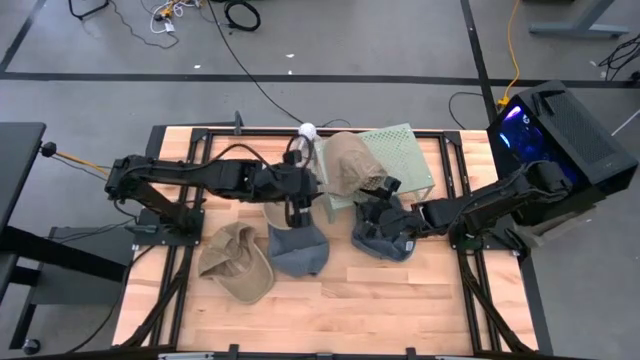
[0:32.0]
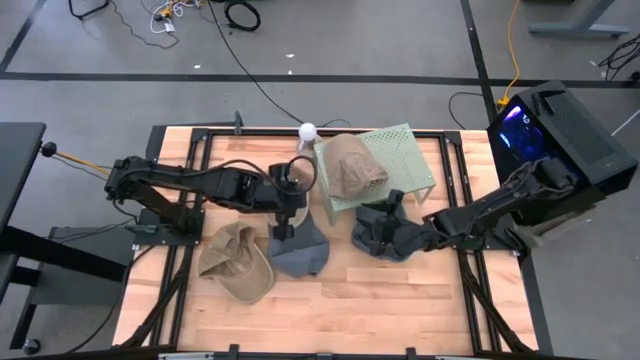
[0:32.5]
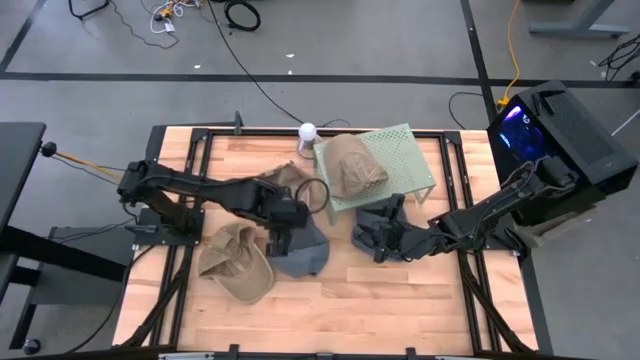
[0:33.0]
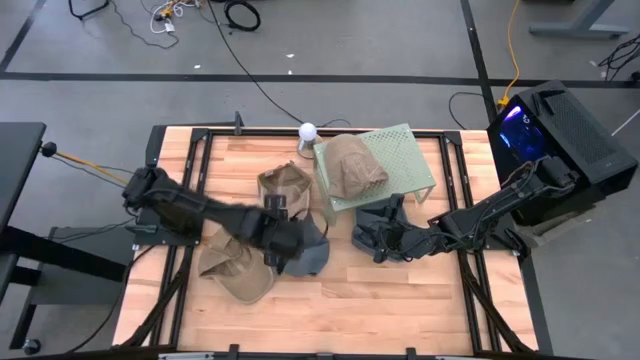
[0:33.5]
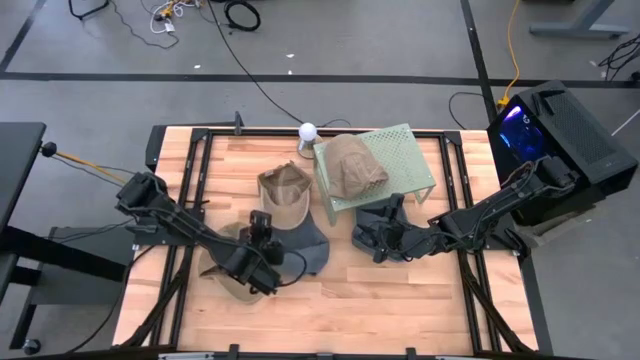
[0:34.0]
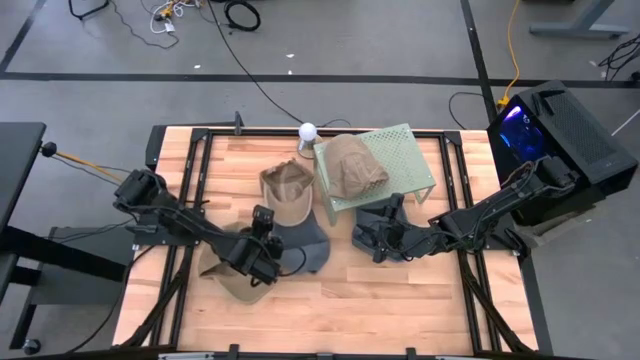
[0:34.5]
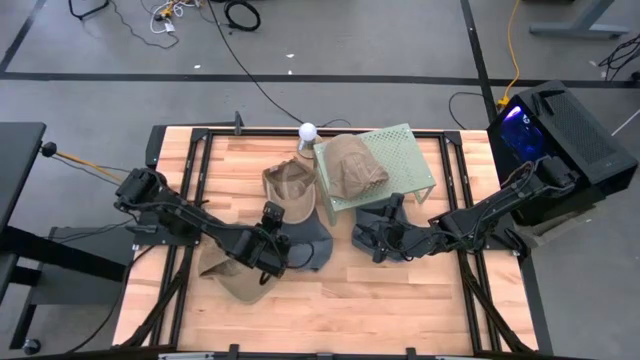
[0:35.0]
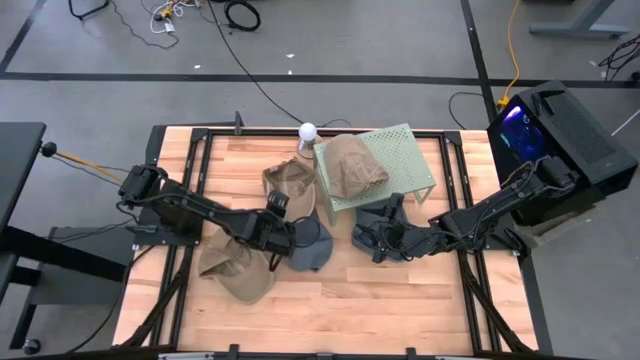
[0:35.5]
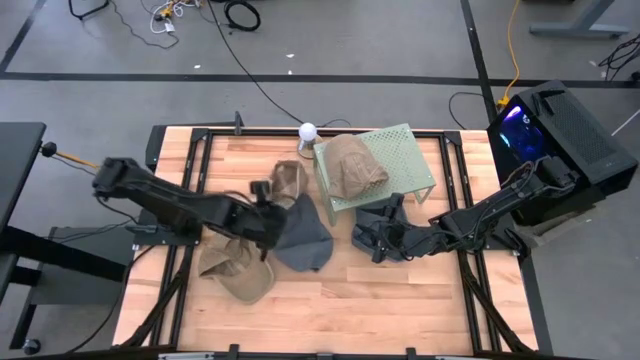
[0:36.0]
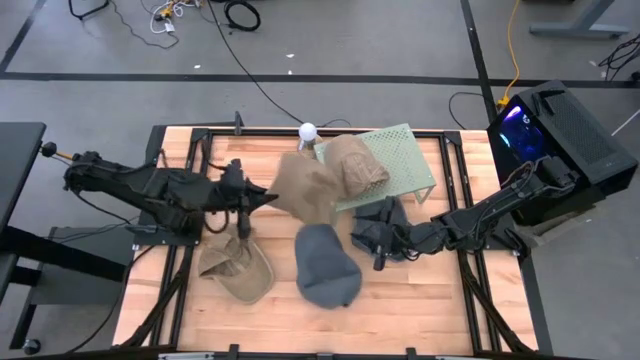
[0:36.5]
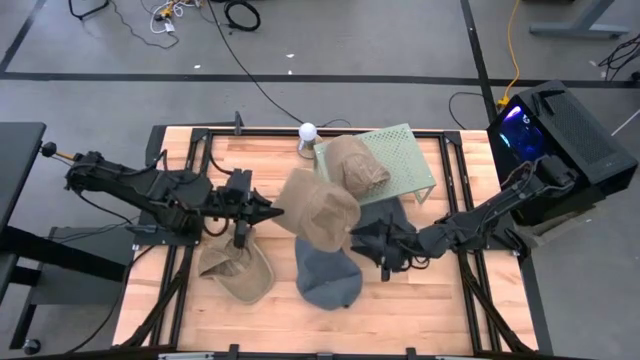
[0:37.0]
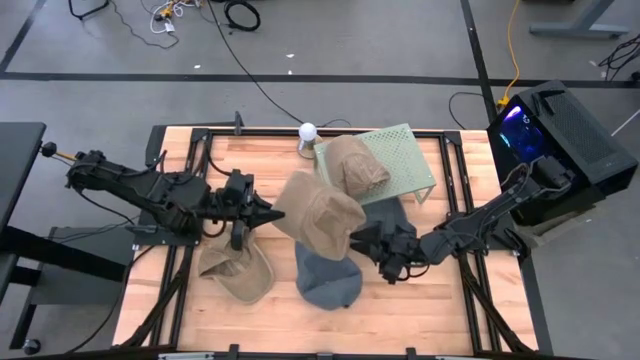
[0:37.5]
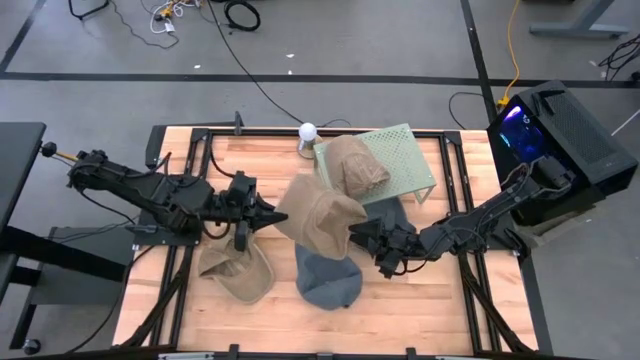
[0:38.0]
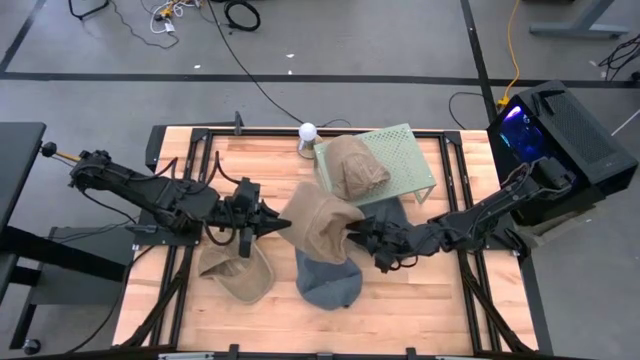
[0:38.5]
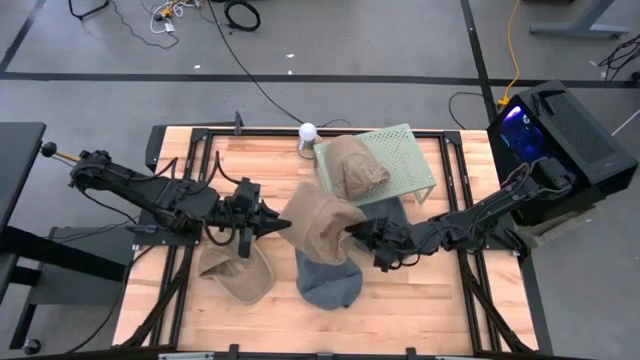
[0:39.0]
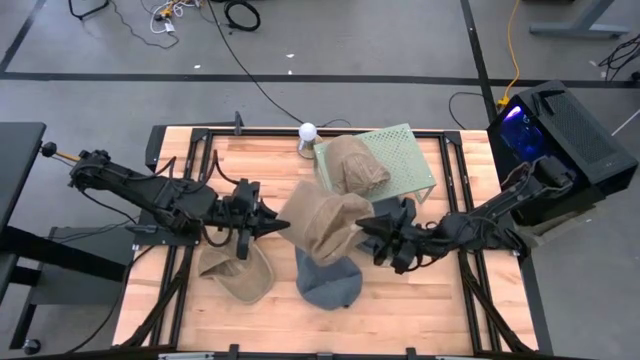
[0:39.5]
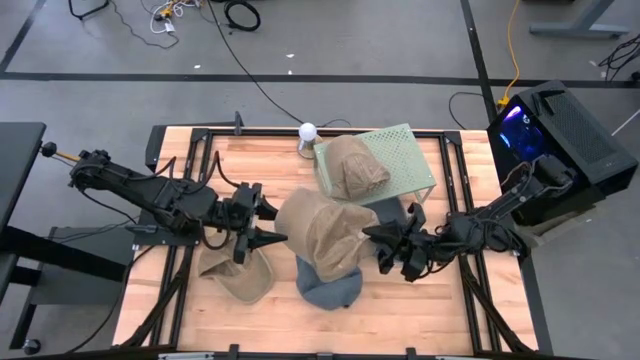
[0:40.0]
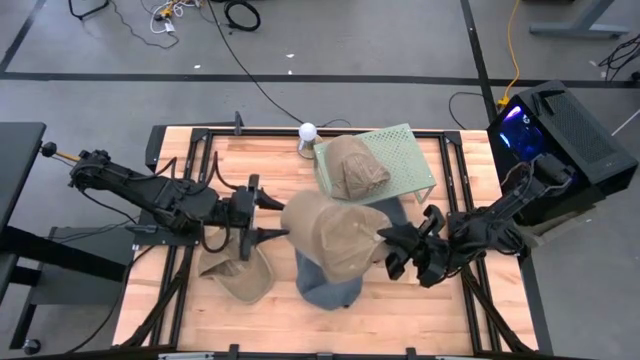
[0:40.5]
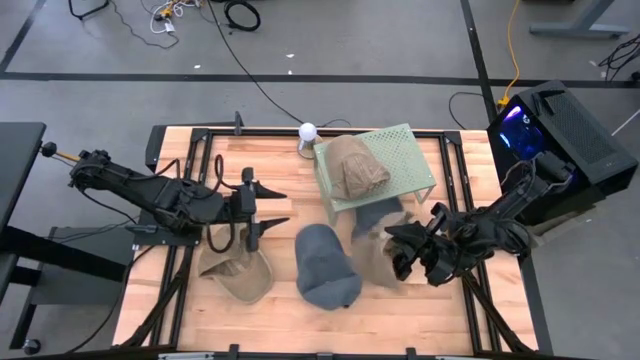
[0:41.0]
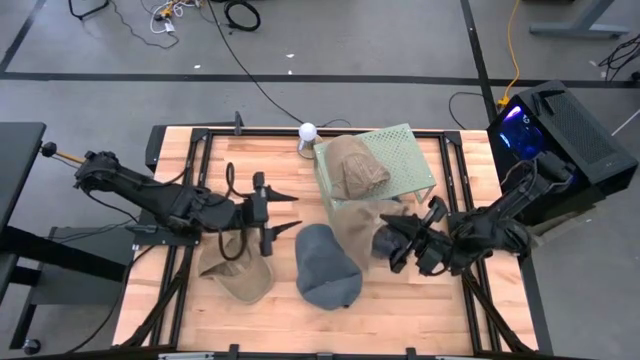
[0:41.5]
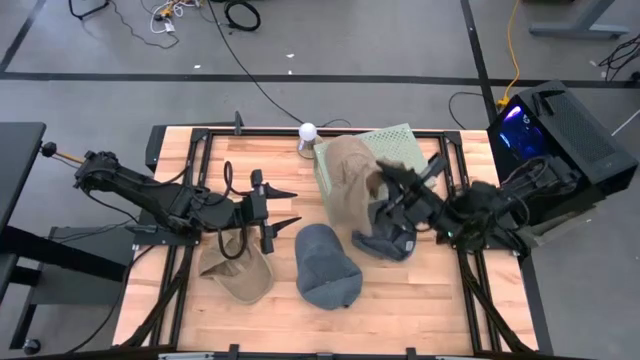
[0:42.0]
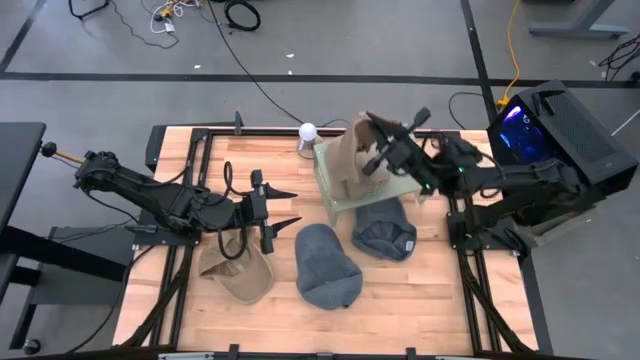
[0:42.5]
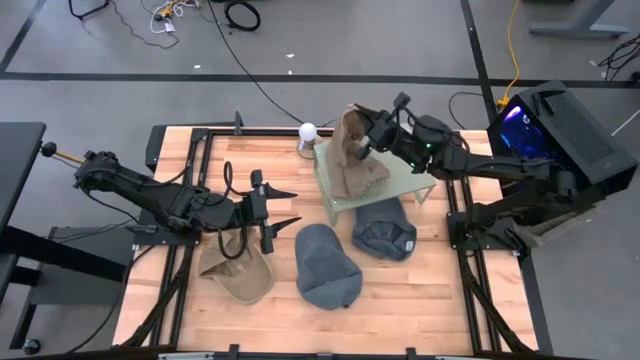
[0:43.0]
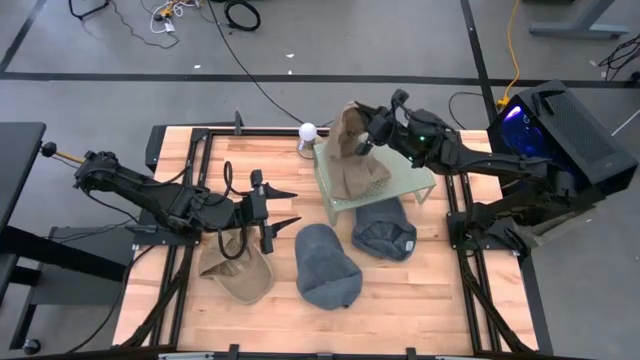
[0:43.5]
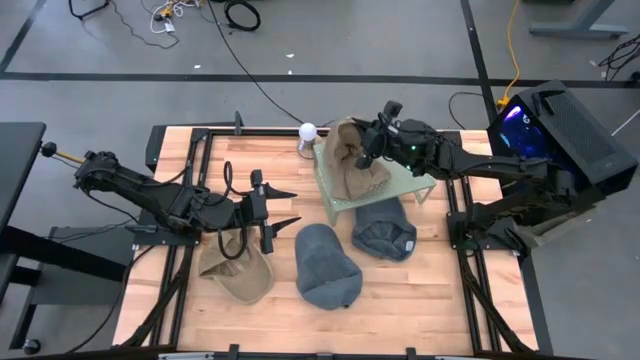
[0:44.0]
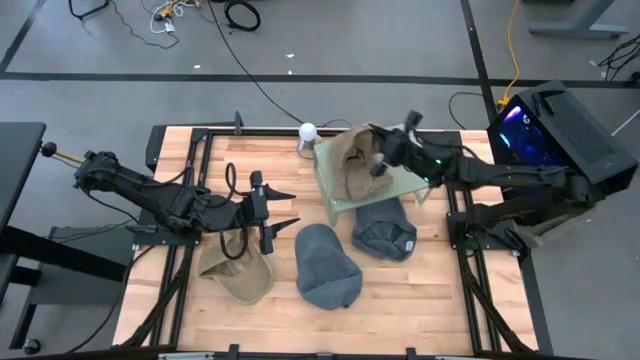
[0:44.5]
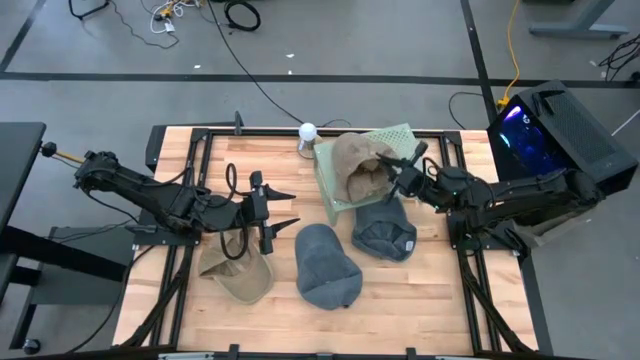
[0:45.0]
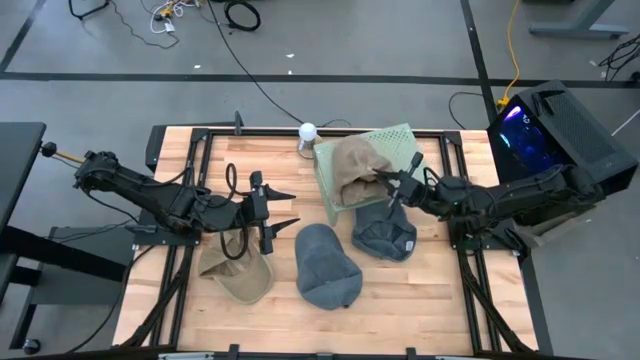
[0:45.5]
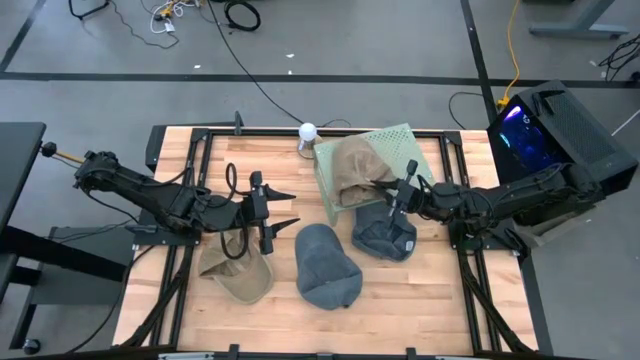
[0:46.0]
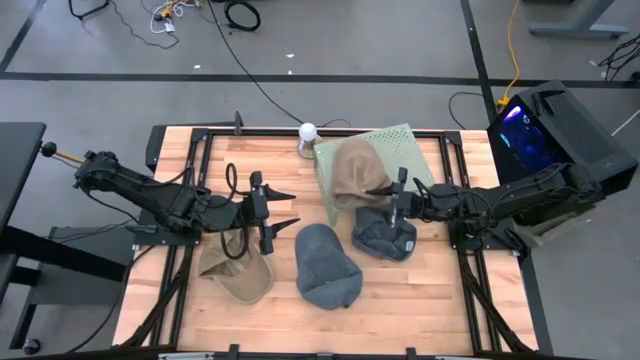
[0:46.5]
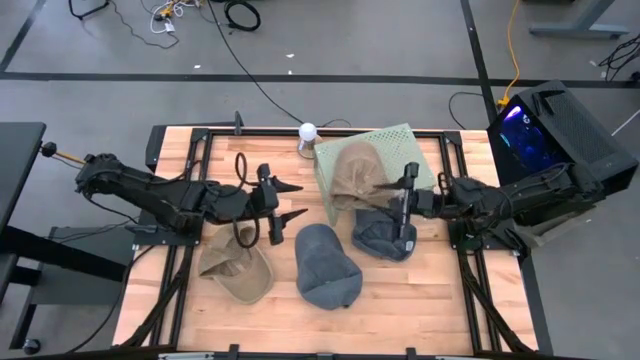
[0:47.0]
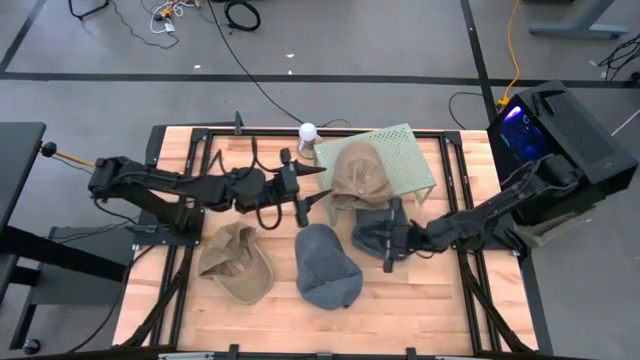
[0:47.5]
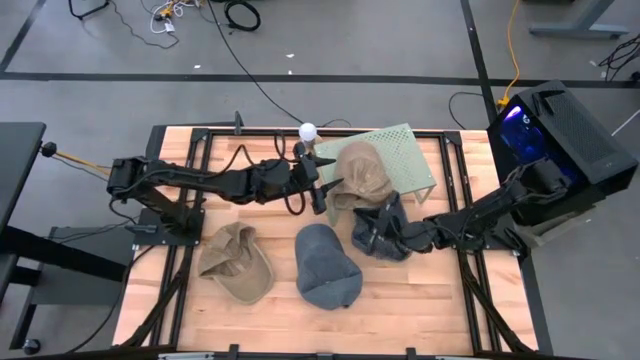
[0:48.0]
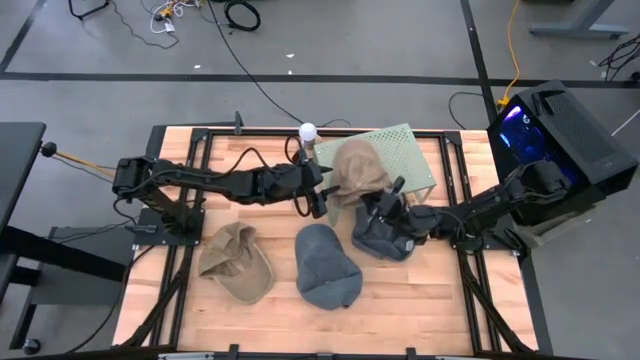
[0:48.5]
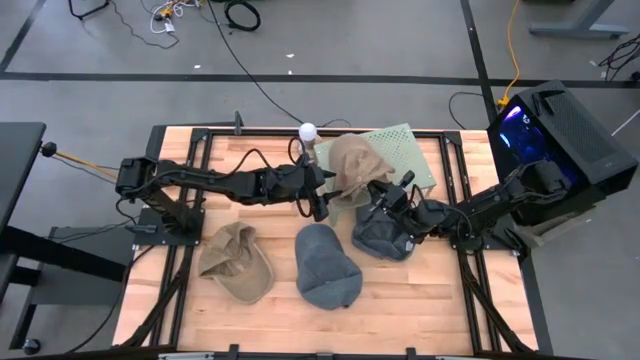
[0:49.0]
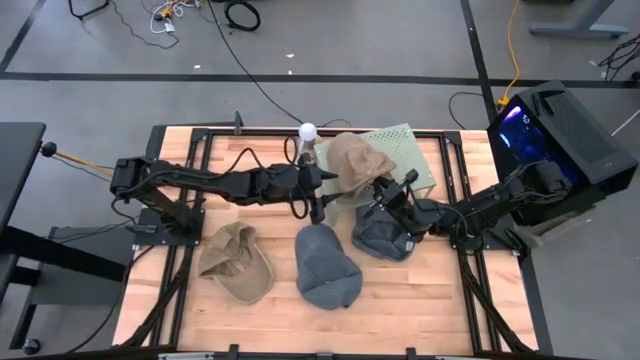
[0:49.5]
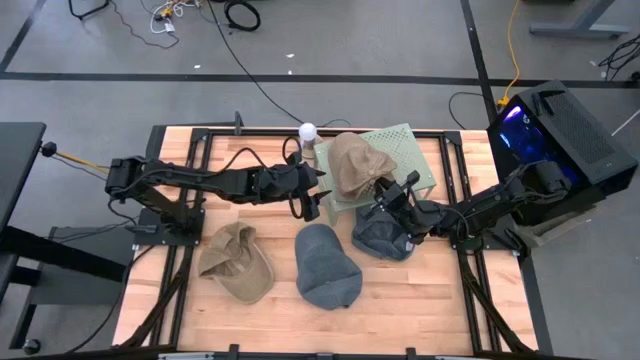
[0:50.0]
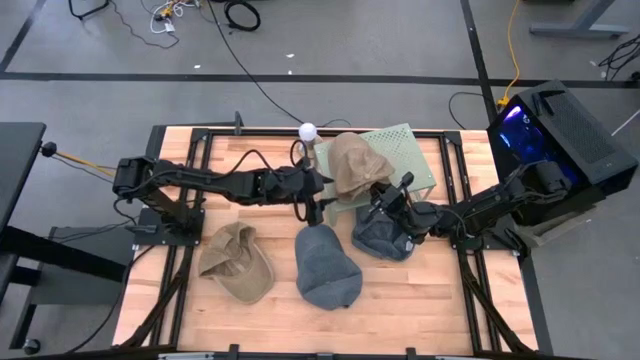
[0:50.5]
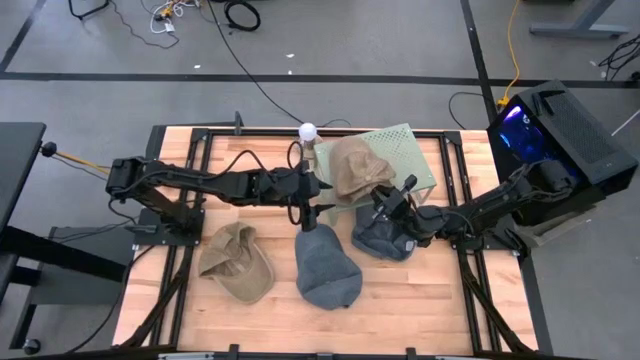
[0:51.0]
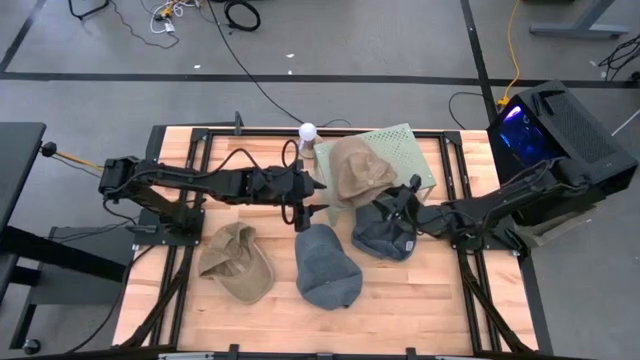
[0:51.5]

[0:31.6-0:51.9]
Task: Stack caps on shelf
Stack the top brown cap on the brown cap on the shelf

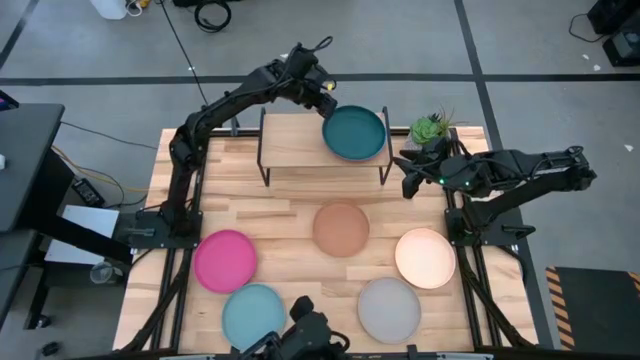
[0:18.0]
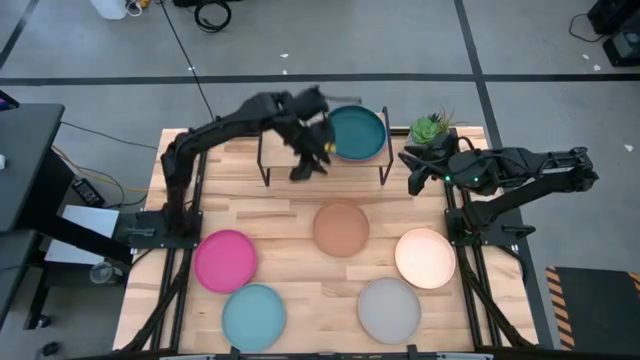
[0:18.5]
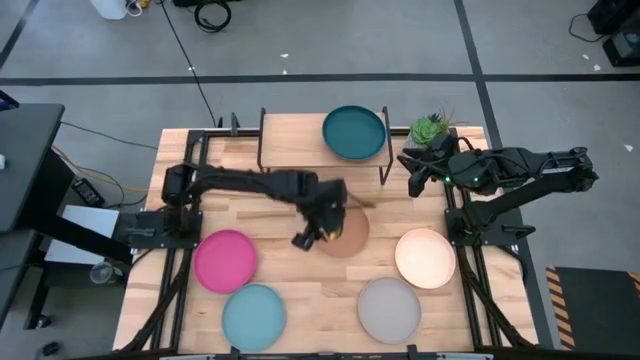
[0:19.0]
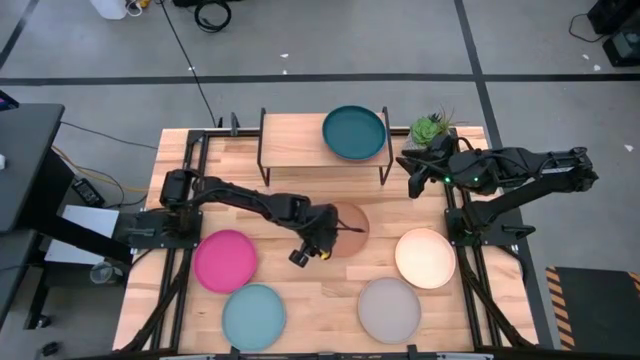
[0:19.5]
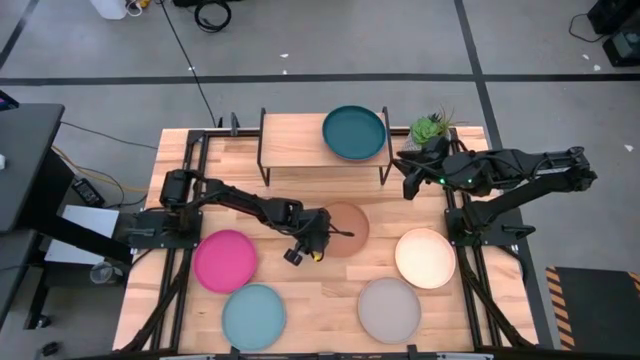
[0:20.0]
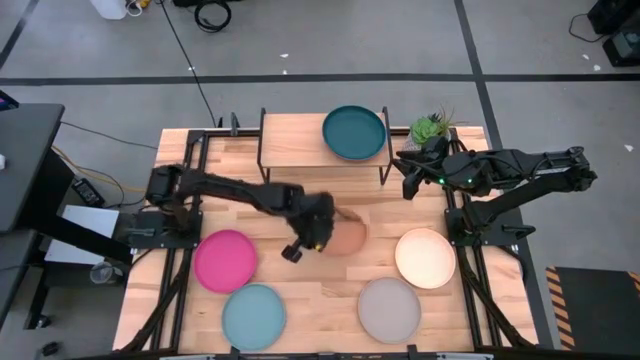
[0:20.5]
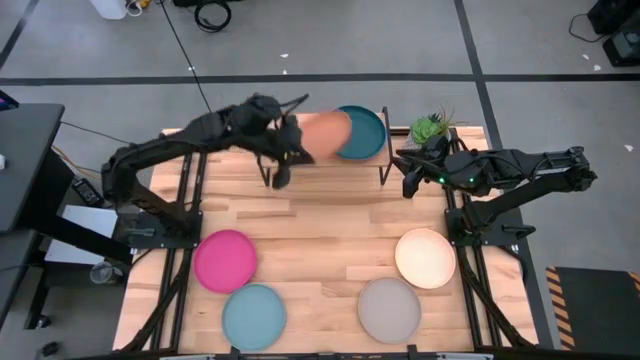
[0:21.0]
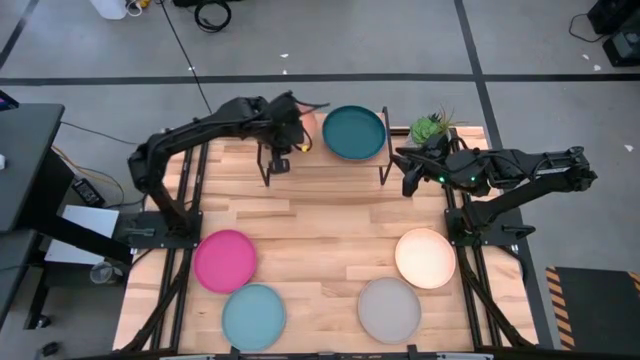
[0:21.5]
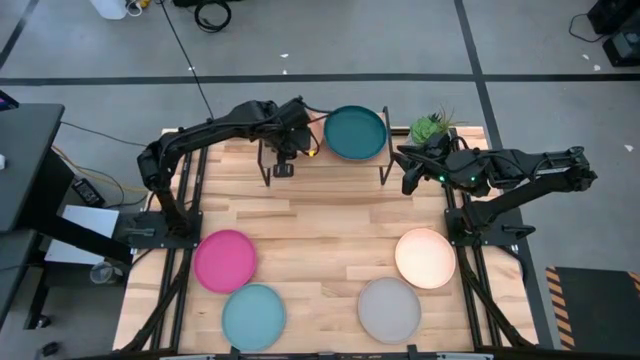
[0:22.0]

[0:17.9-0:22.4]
Task: Place and stack plates onto a shelf
Put the brown plate on the shelf
